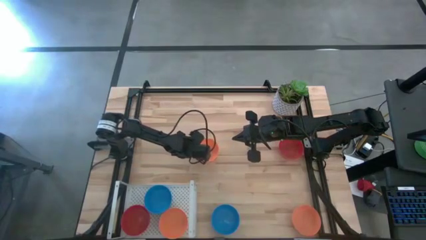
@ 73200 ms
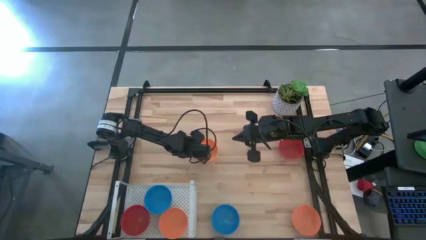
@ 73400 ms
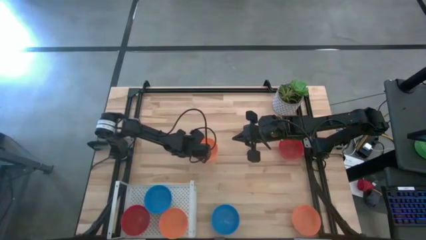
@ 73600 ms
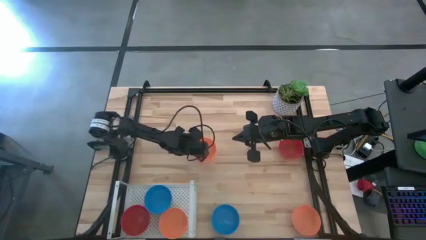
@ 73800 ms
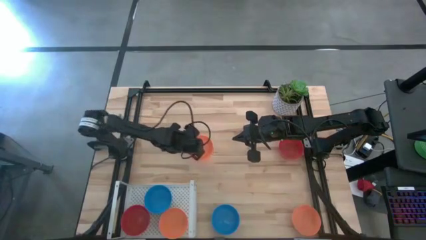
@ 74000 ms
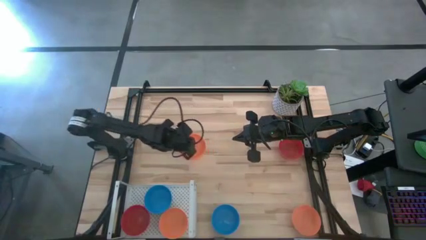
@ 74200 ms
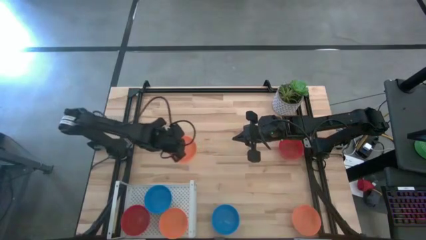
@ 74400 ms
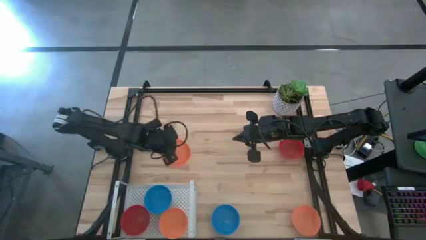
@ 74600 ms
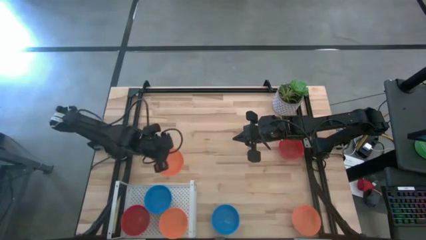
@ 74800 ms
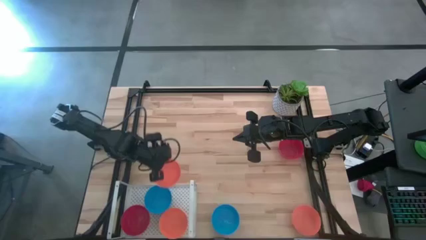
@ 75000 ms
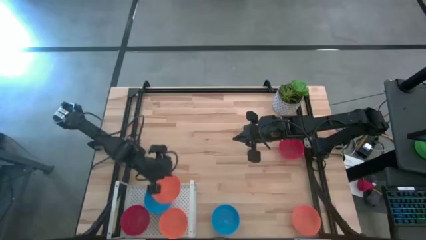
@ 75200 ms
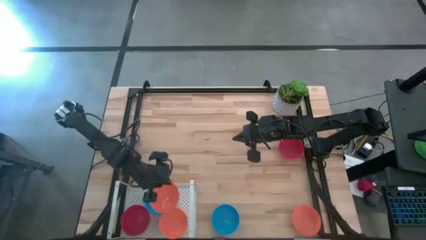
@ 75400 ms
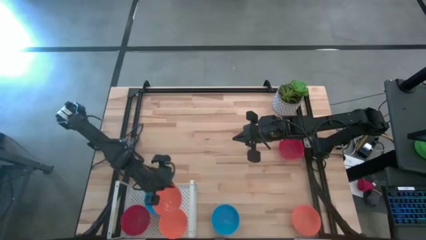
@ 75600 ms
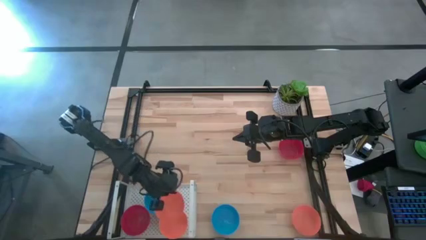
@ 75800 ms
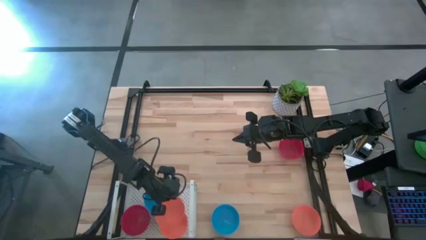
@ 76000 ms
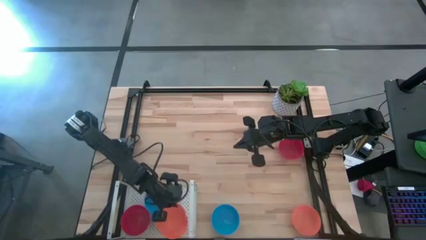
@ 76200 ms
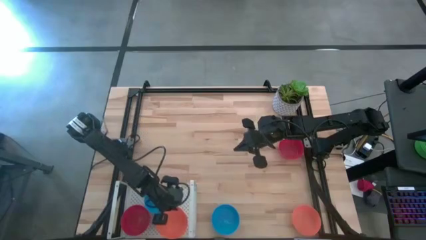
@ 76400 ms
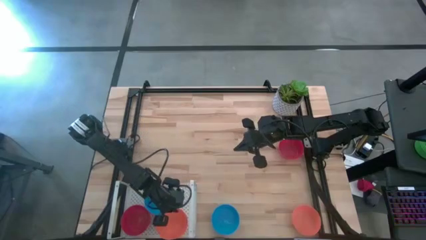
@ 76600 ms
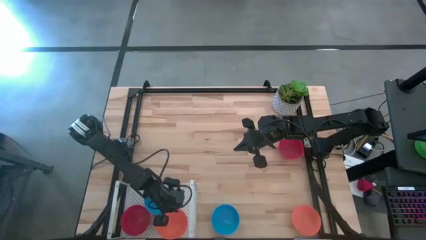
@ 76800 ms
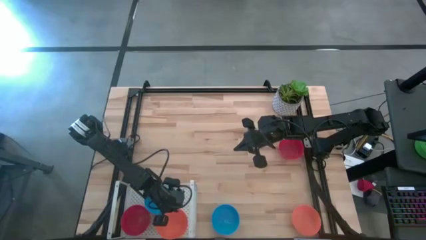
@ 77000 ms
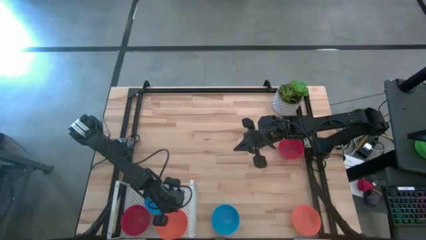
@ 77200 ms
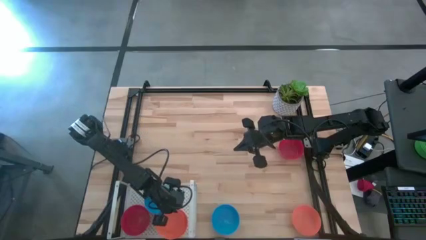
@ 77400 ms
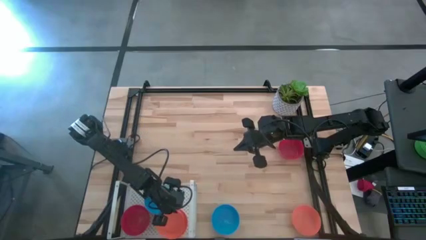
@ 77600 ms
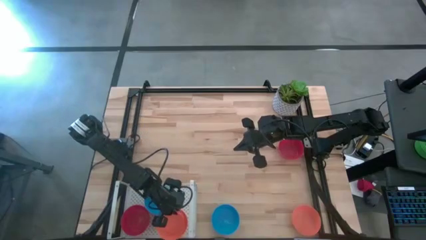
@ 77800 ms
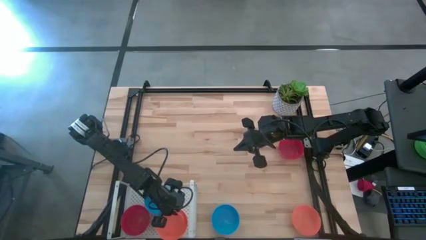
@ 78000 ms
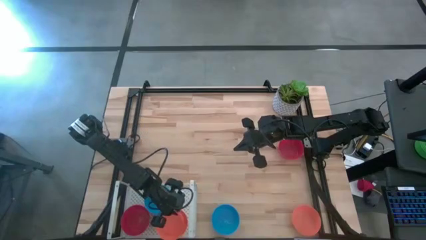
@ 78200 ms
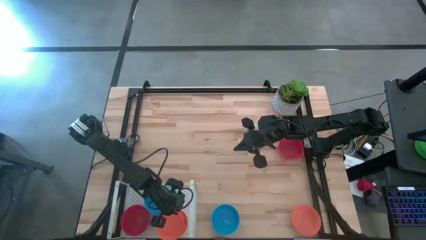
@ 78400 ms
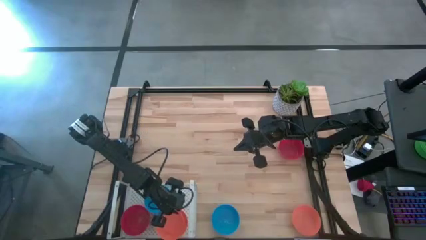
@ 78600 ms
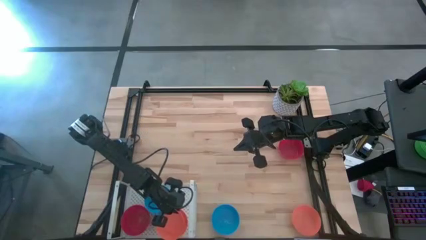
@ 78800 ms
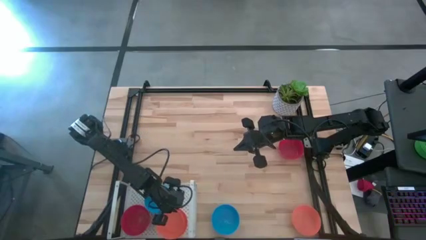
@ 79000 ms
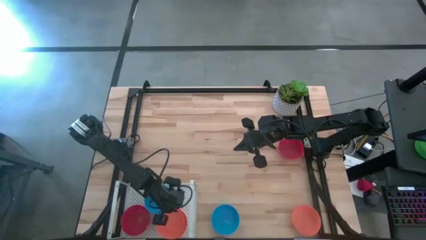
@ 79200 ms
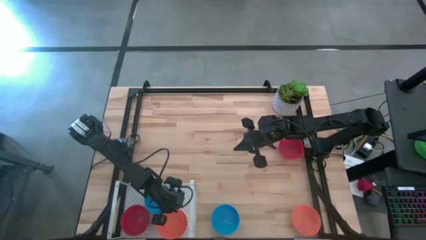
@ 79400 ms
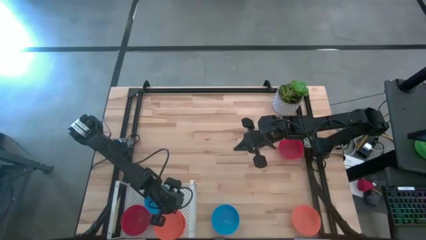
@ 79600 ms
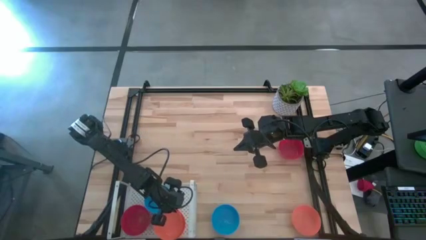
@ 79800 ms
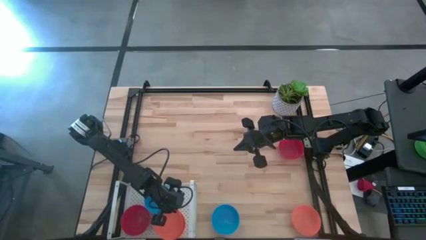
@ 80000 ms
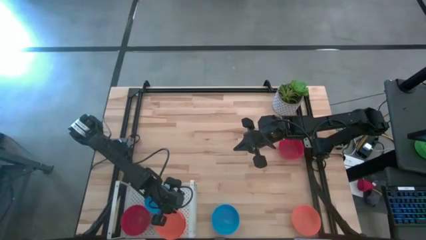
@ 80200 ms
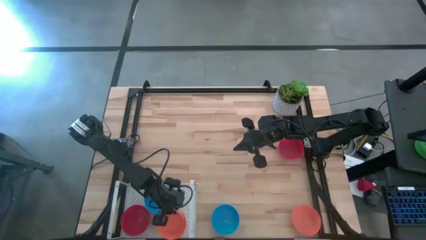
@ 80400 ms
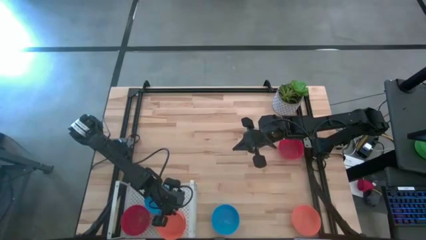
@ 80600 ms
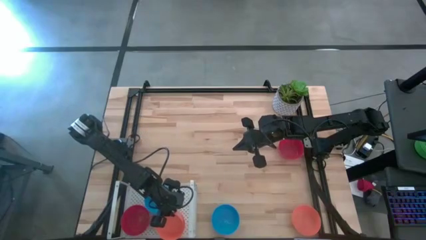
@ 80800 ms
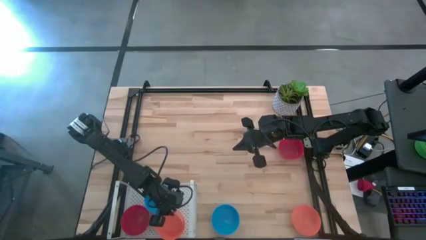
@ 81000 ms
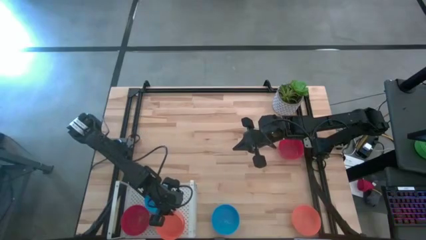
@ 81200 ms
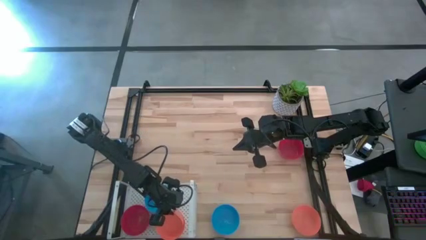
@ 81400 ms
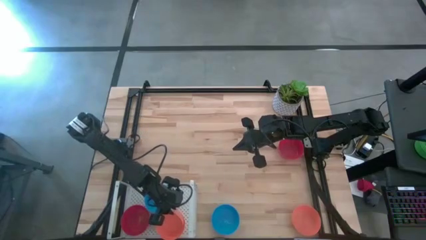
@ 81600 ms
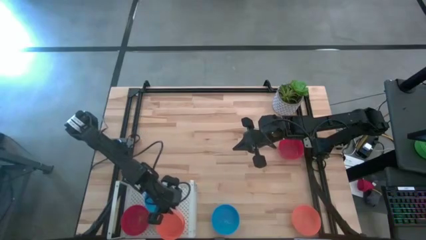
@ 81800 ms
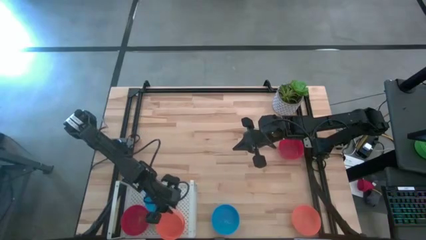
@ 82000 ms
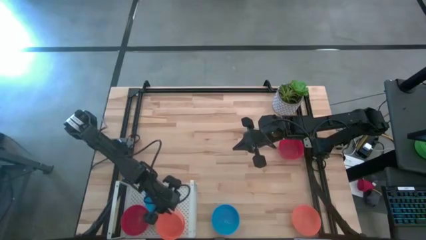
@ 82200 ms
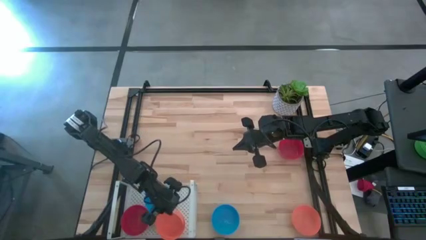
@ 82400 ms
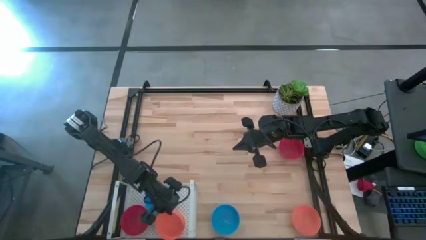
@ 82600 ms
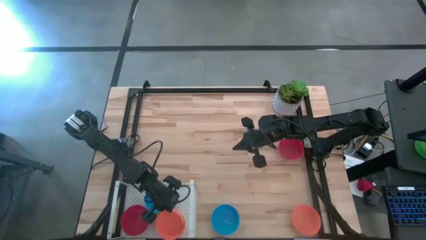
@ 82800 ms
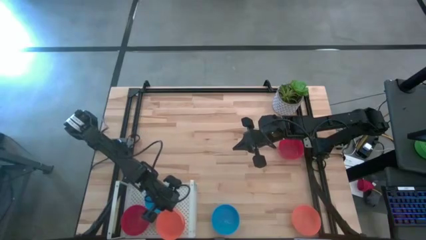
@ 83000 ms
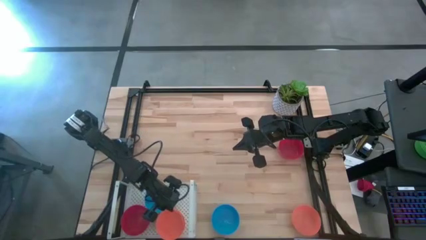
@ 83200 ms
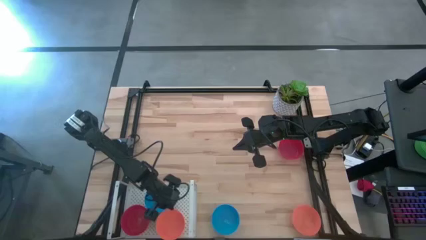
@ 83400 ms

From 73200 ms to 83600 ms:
Task: Pick & Place Mini bowls
Stack the top orange bowl on top of the orange bowl on the shelf

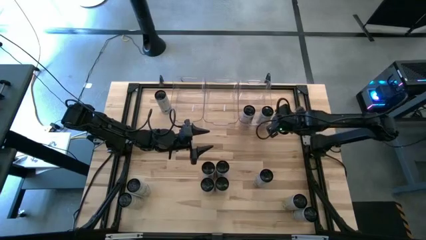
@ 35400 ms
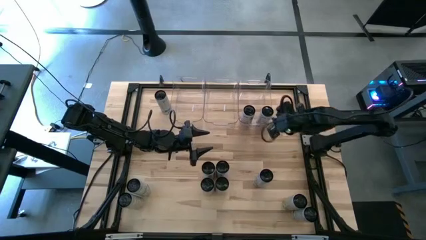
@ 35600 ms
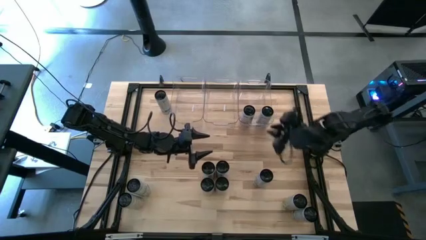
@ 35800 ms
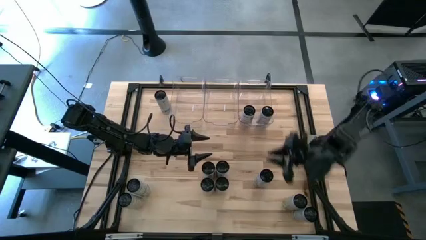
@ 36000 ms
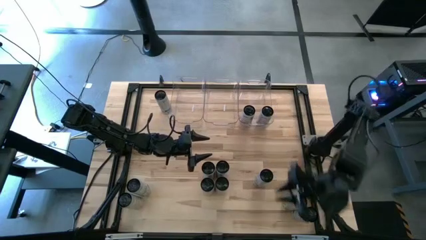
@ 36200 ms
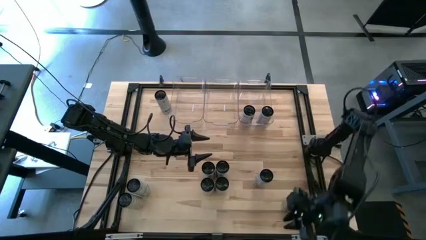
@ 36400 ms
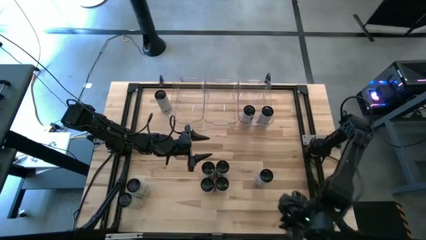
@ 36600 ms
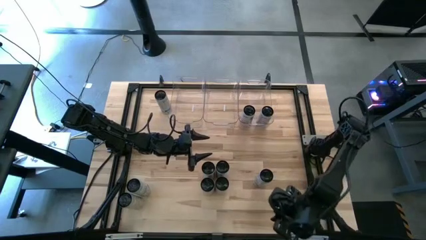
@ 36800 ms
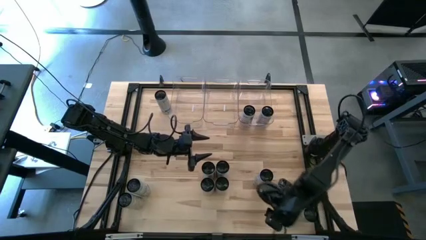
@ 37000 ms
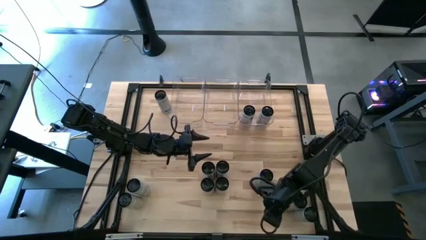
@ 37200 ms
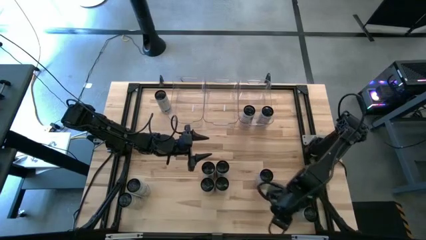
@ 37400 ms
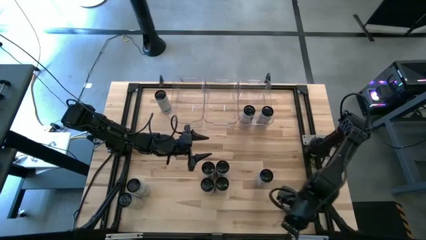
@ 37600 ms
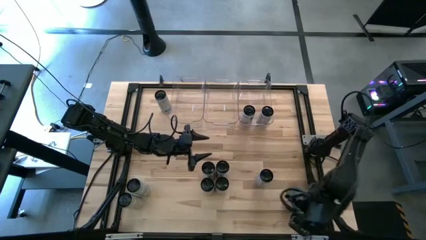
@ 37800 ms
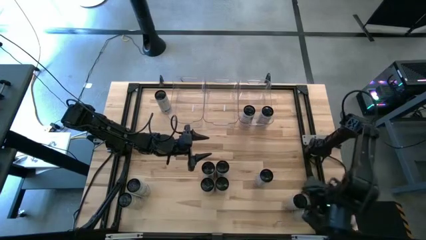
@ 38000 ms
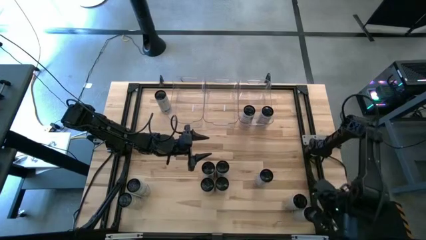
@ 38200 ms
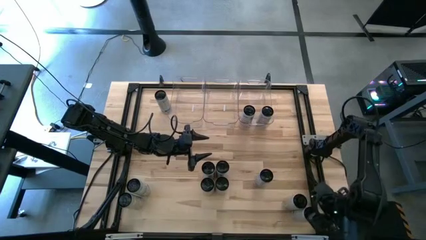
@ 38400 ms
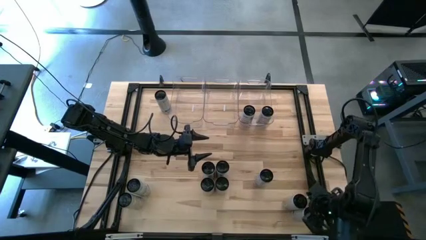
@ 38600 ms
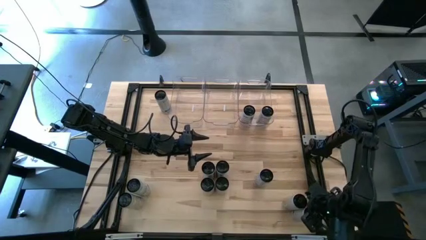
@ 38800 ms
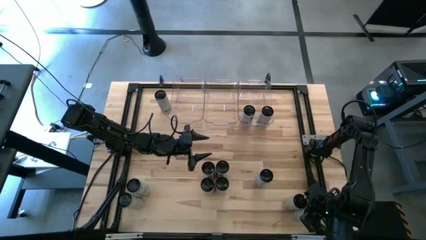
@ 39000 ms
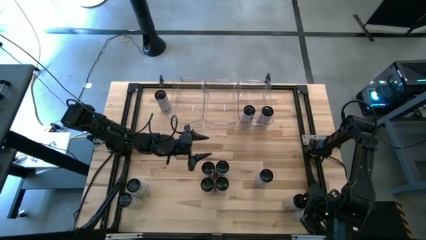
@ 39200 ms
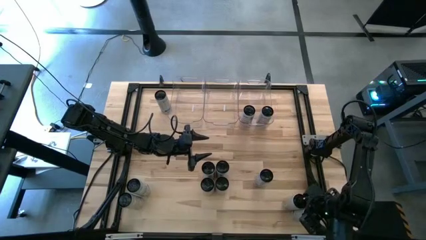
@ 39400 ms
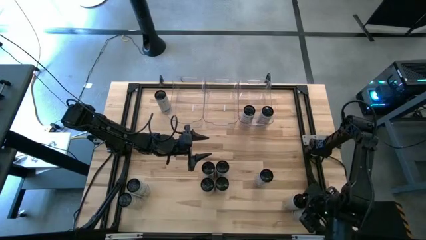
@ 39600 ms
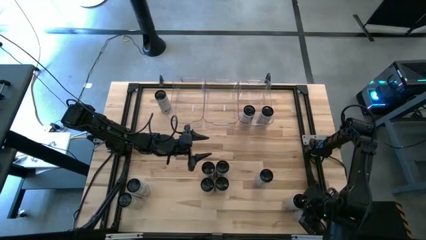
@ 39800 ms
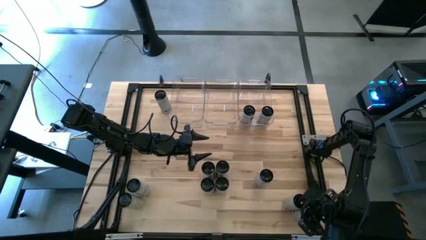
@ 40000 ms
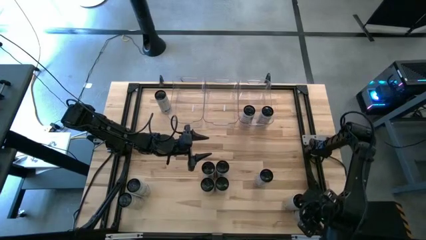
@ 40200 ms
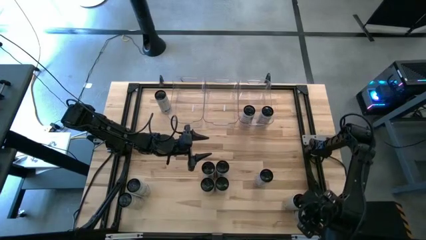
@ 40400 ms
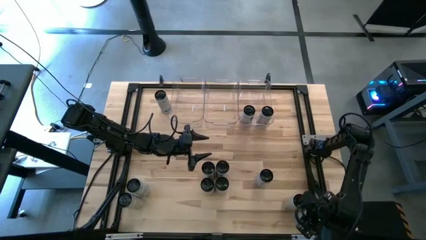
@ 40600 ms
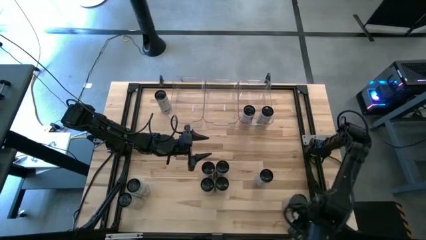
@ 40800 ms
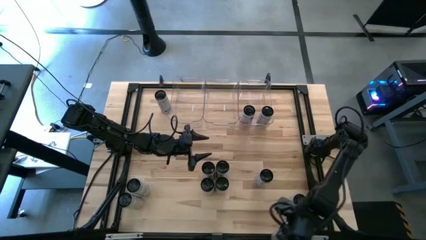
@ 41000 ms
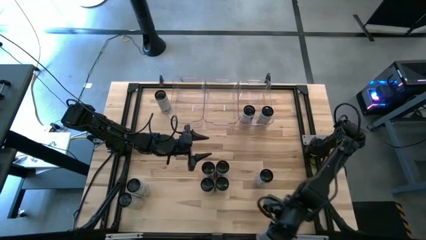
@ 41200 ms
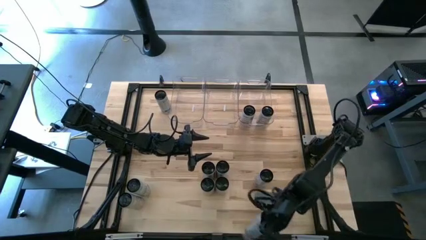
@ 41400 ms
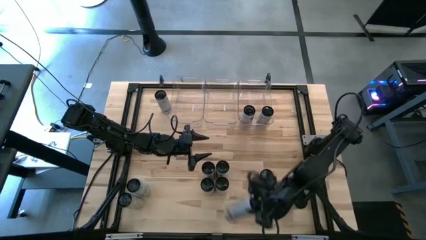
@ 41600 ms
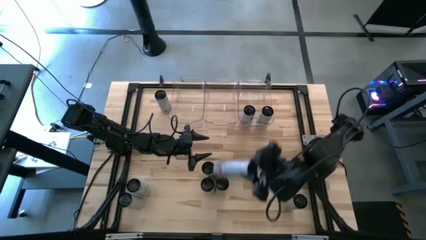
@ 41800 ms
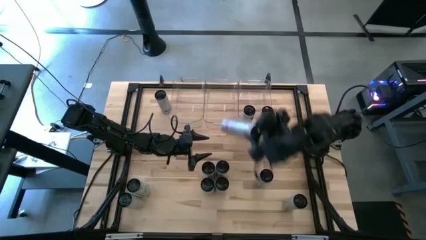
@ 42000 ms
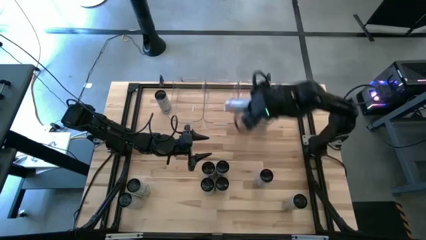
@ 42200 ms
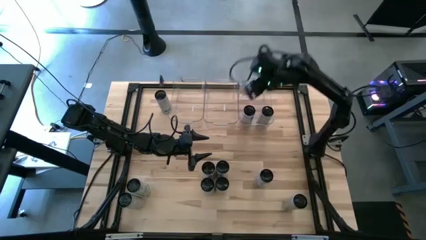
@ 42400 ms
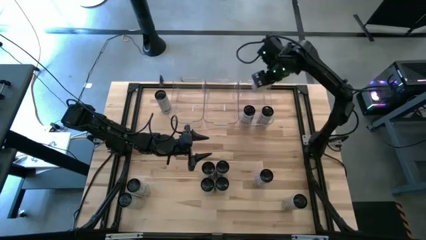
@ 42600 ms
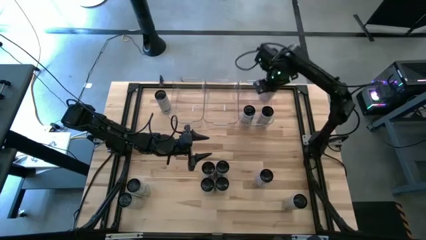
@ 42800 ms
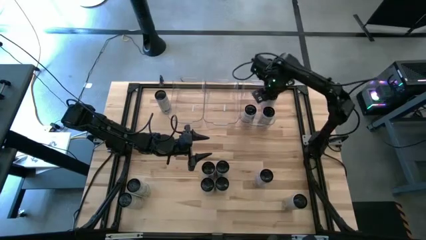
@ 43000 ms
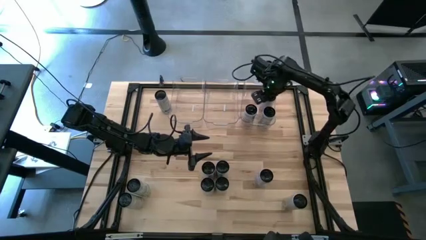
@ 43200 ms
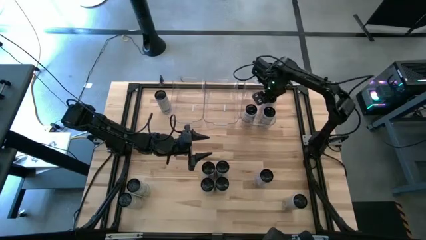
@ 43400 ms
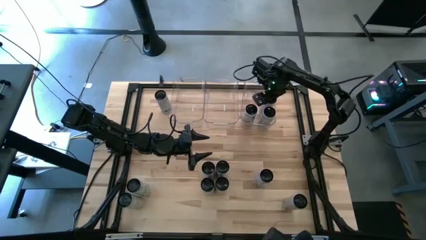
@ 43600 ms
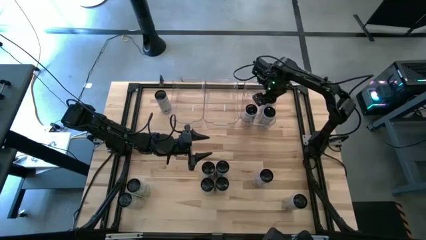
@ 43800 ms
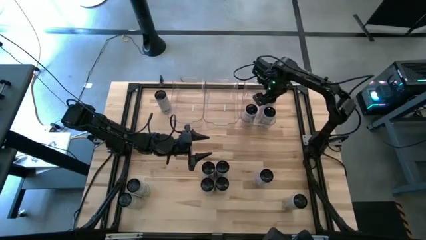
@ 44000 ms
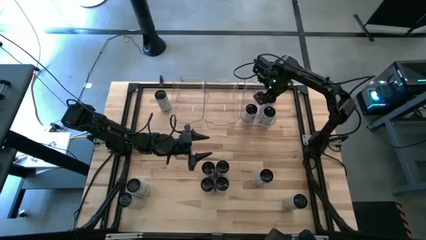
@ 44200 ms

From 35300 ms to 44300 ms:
Task: Sort soda cans
Put the bottom white-pink soda can into the right transparent bin
